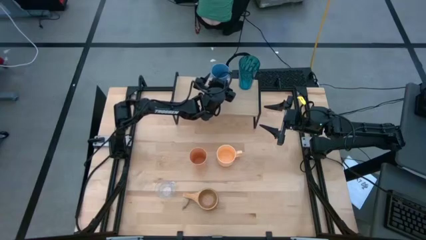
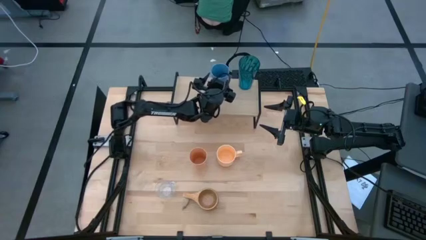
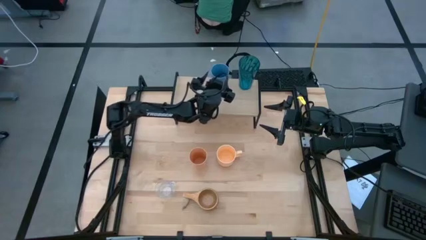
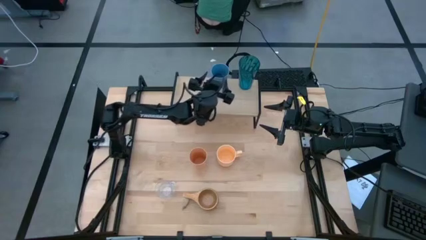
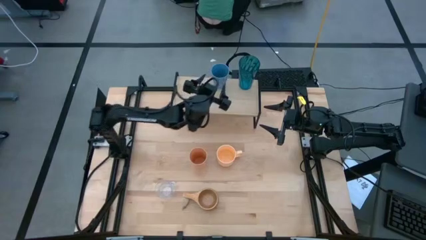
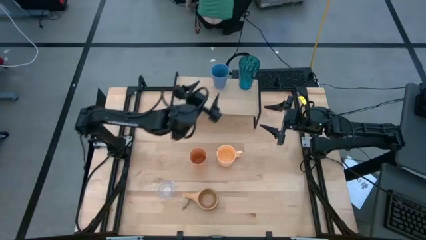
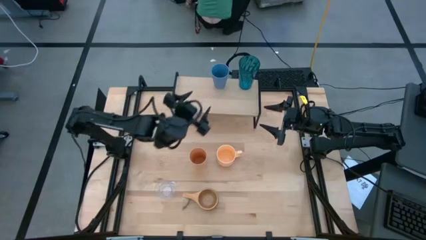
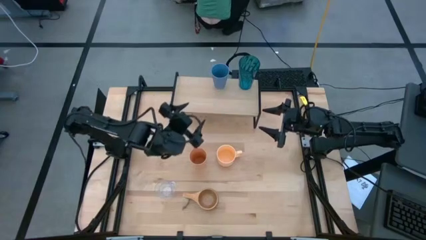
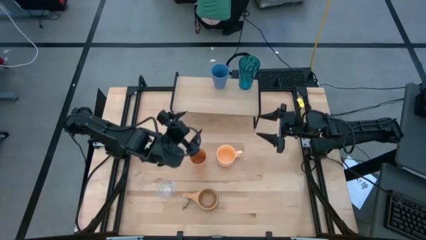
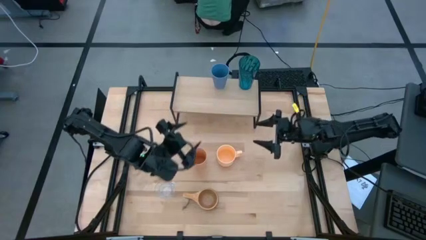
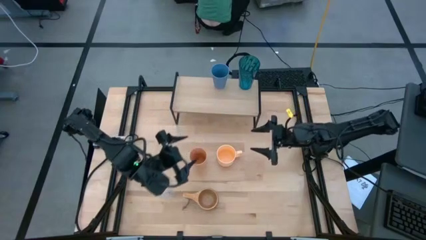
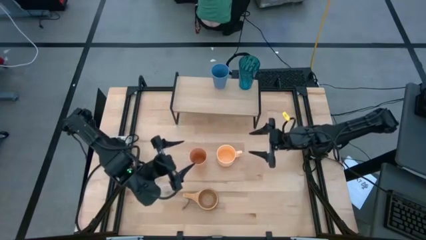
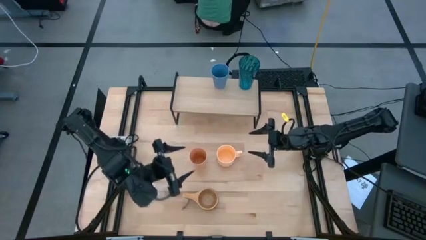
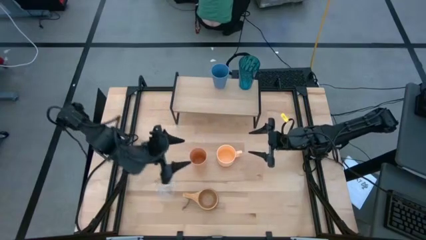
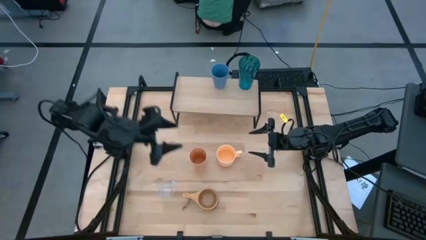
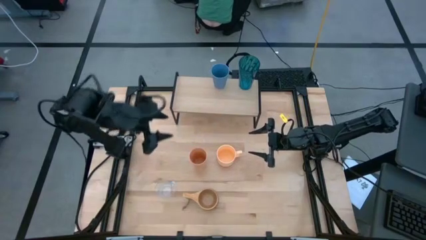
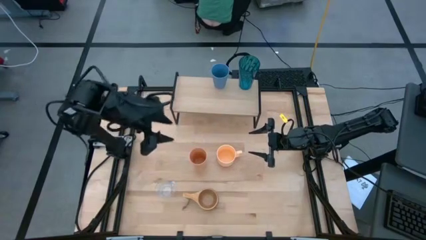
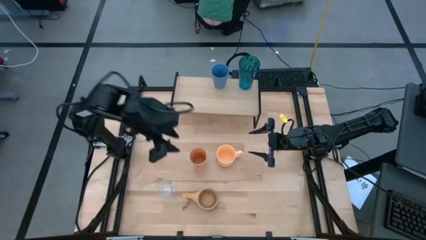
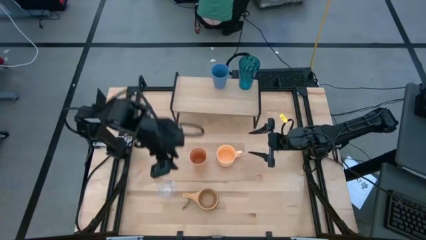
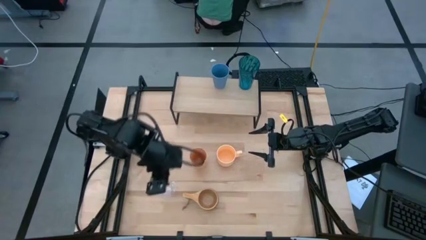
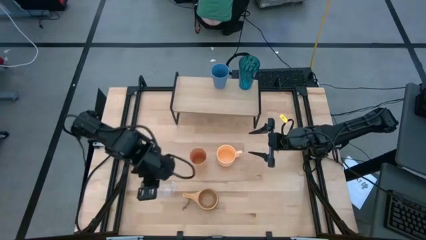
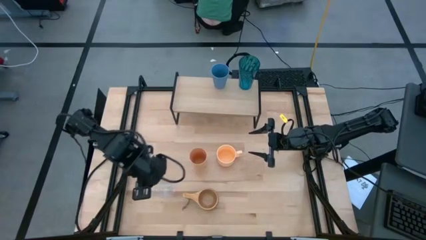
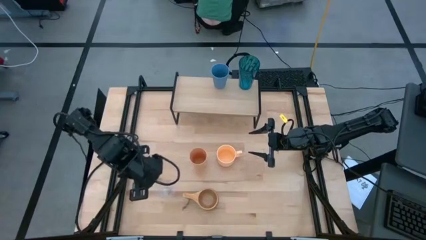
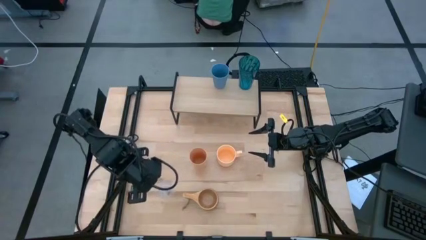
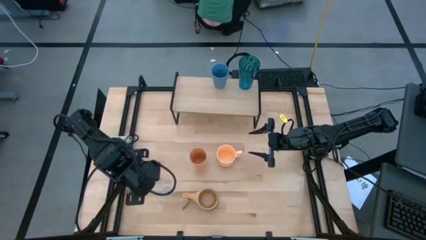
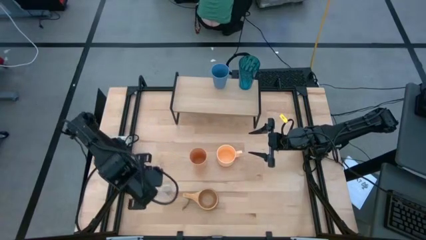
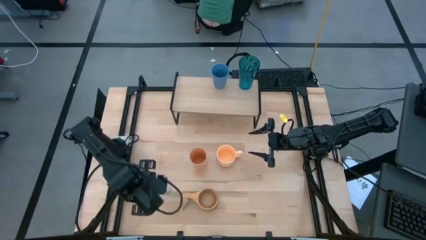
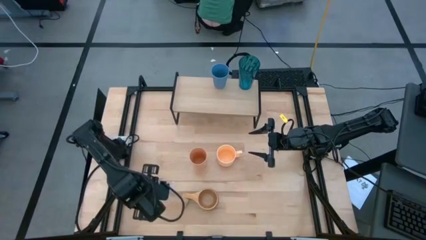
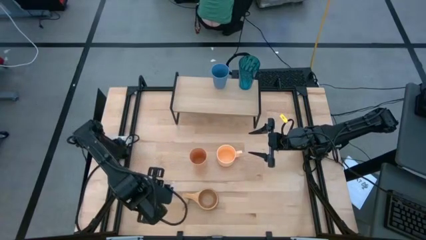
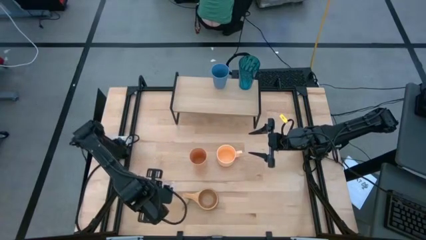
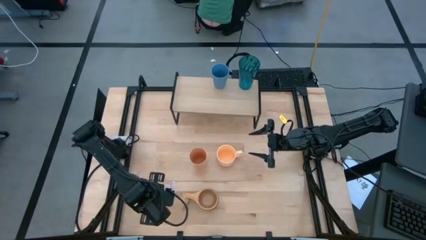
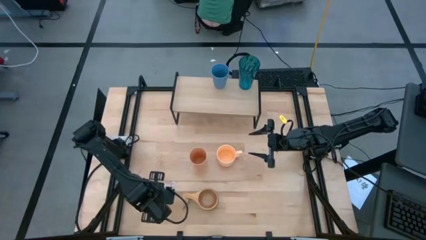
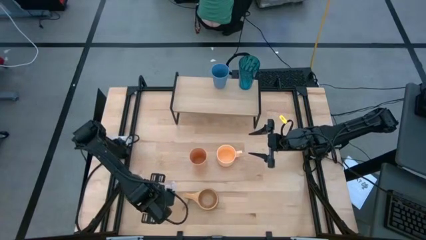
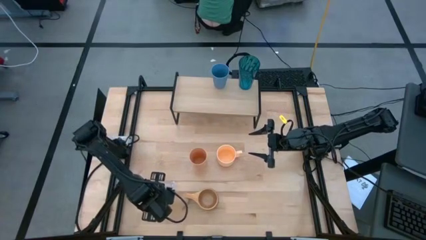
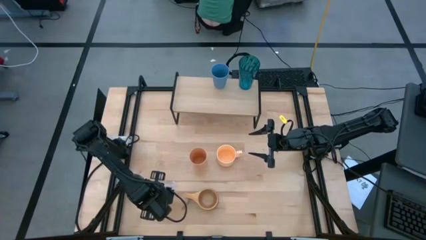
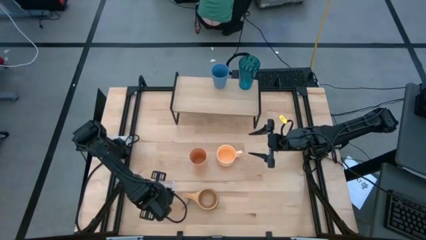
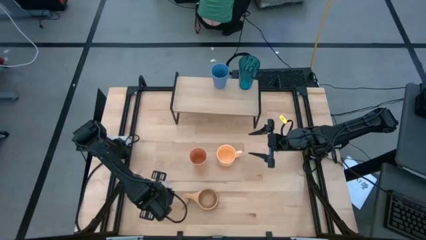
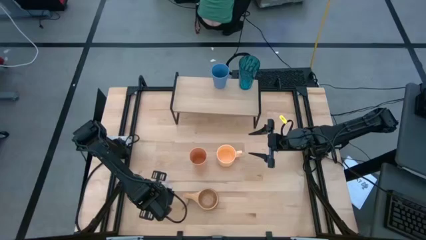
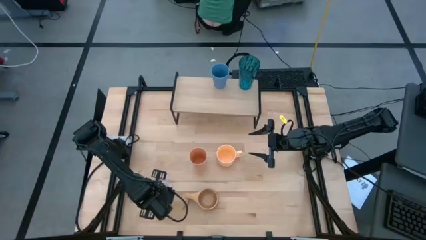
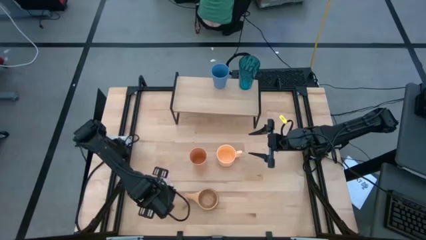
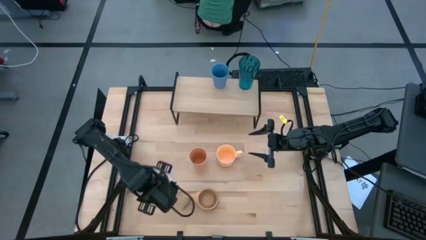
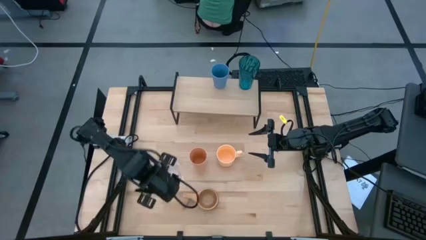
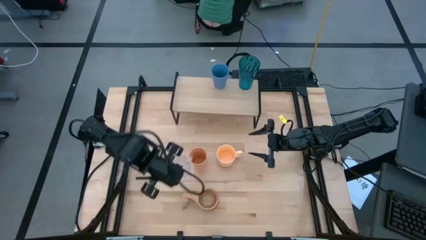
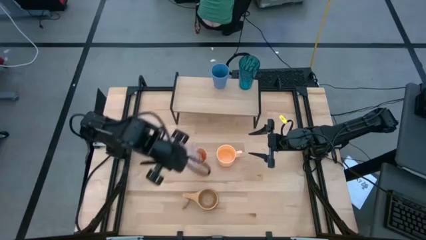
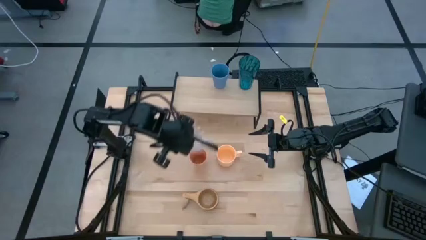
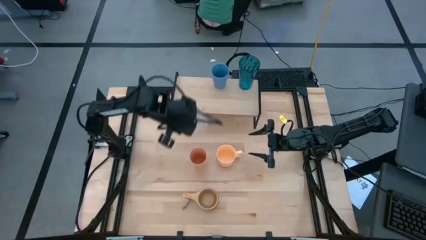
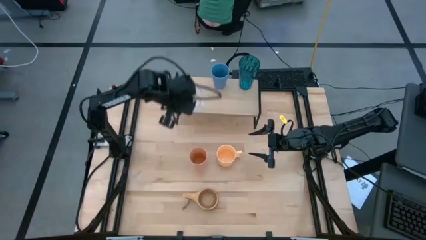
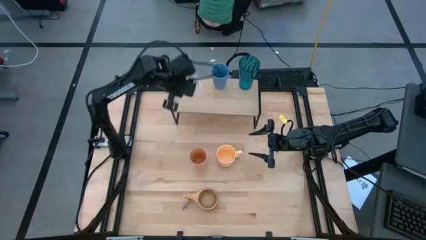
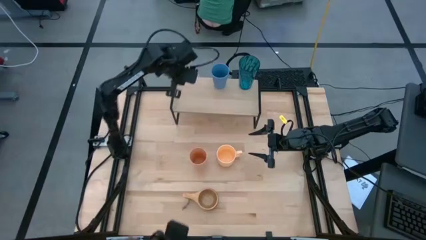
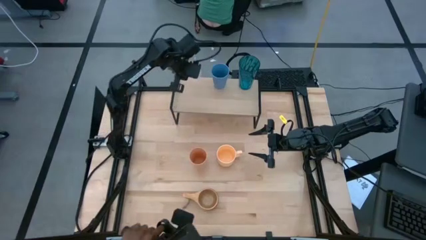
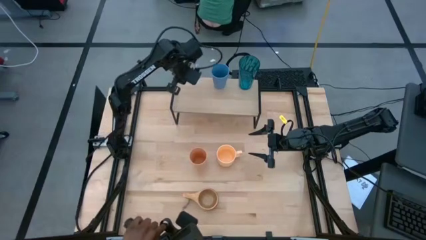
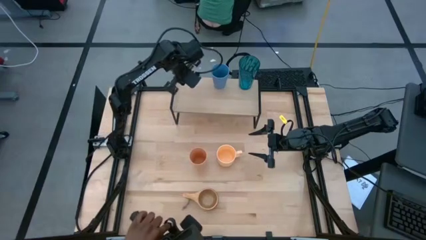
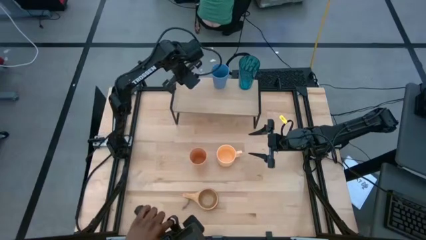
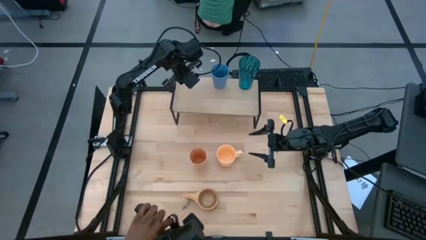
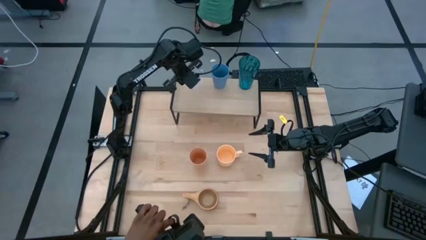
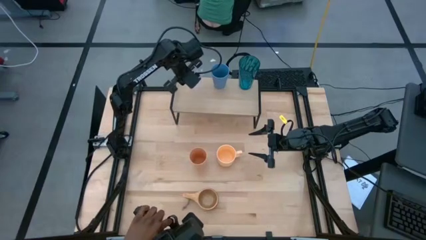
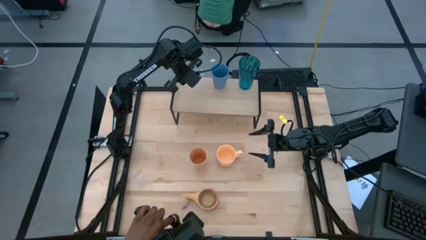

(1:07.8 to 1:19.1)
Task: Stack small to large cups/mugs on shelf
Put the transparent mug on the shelf
